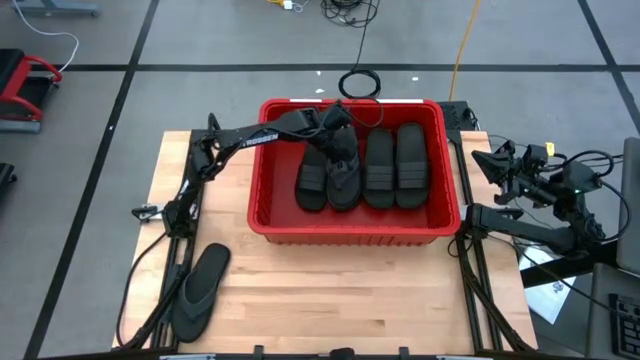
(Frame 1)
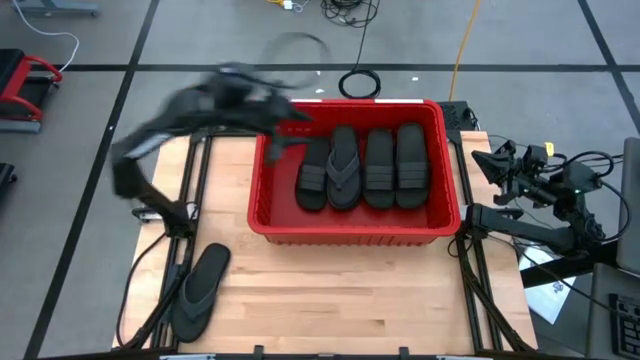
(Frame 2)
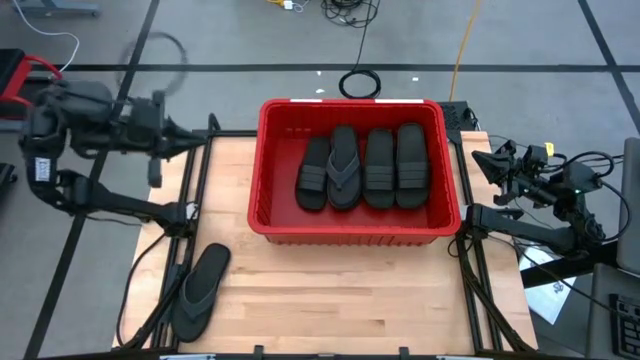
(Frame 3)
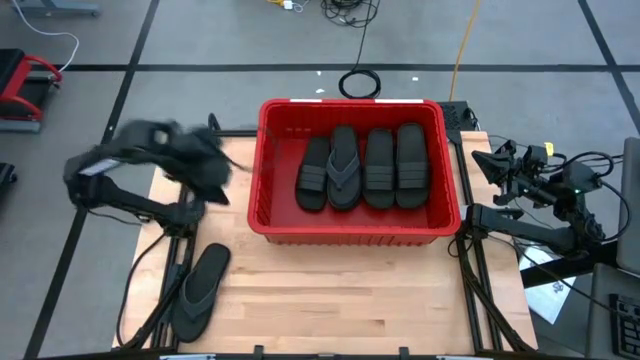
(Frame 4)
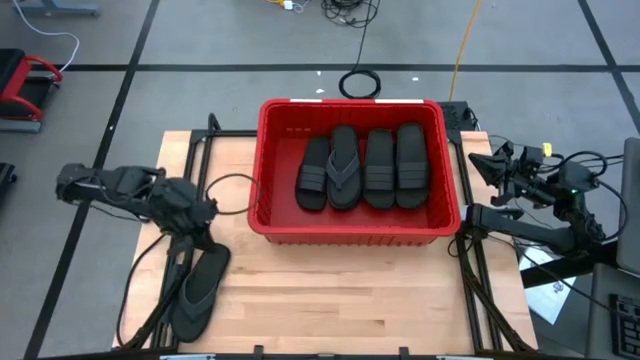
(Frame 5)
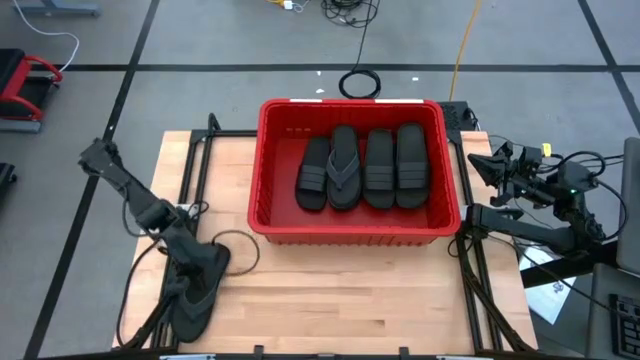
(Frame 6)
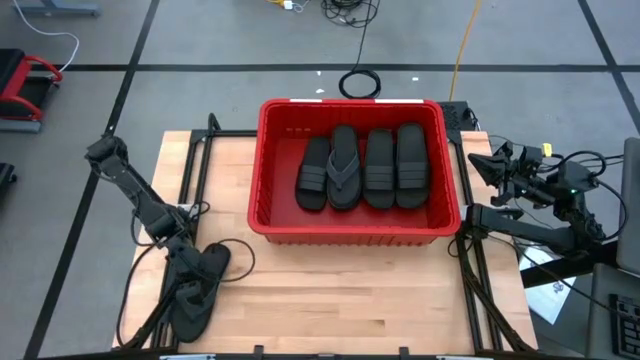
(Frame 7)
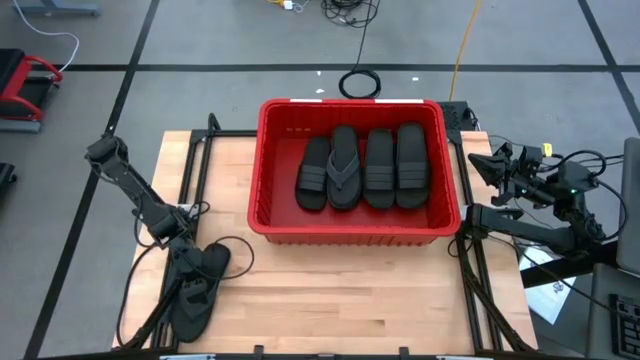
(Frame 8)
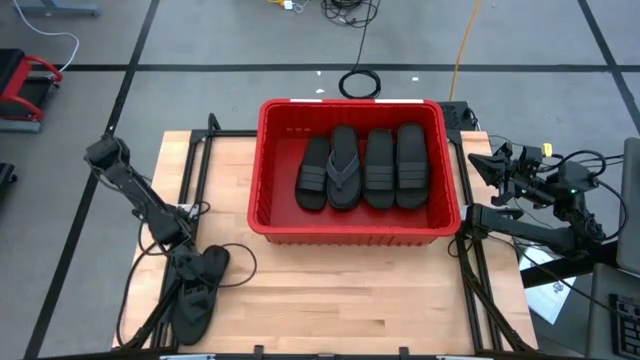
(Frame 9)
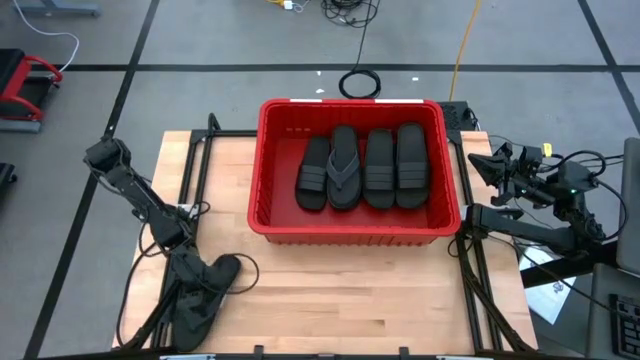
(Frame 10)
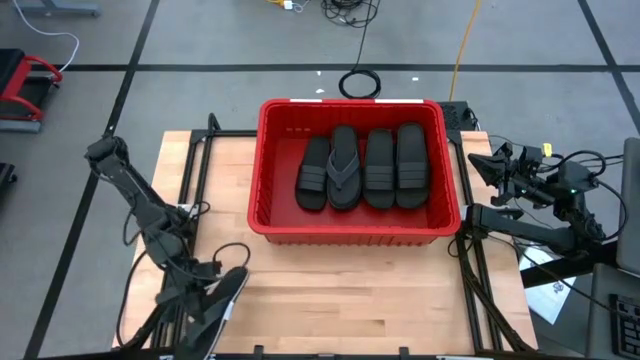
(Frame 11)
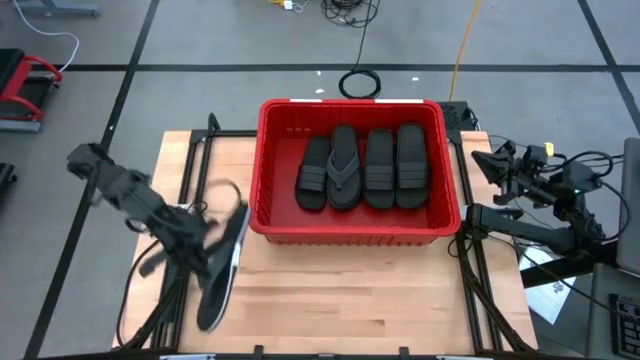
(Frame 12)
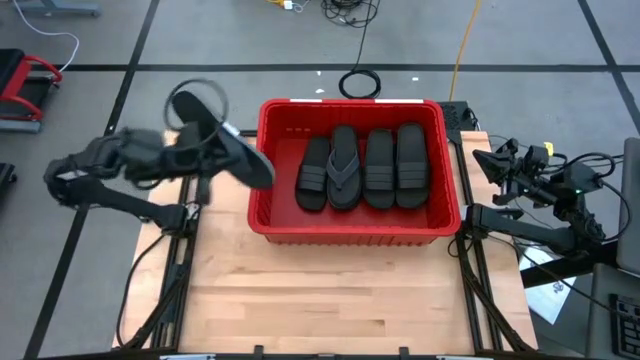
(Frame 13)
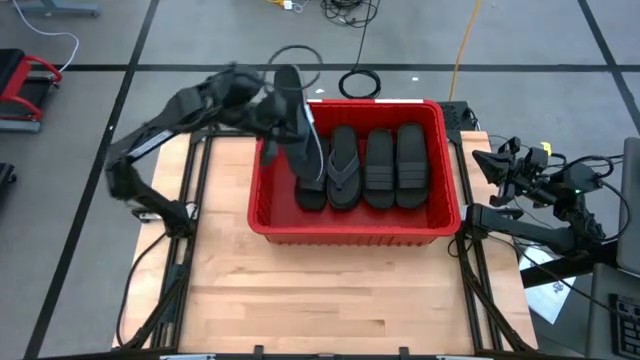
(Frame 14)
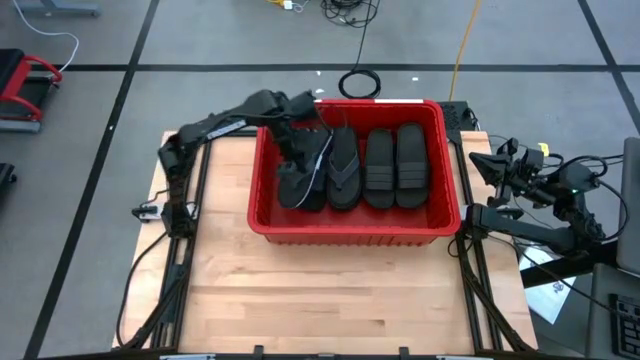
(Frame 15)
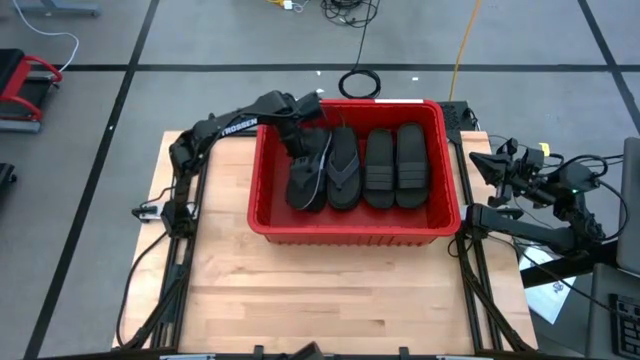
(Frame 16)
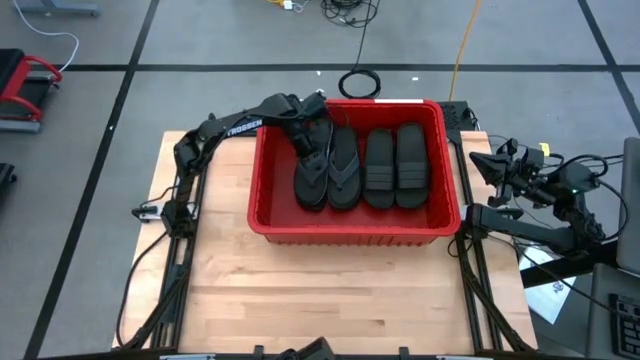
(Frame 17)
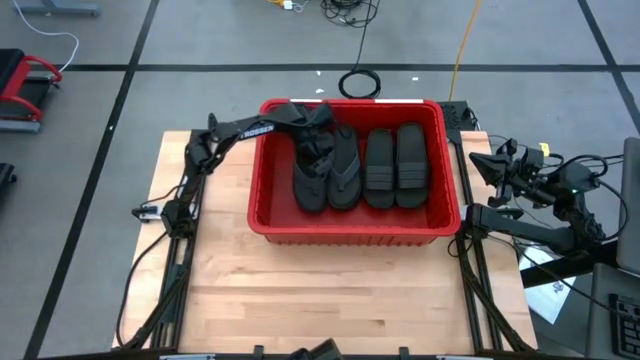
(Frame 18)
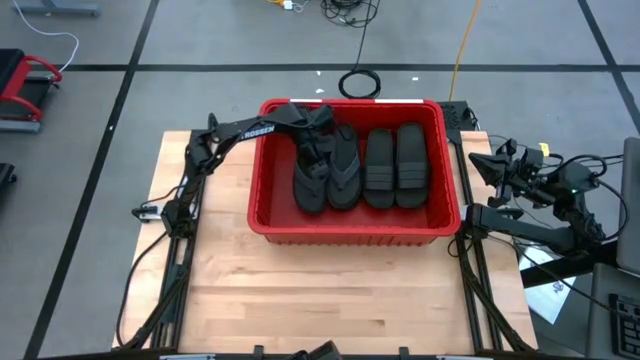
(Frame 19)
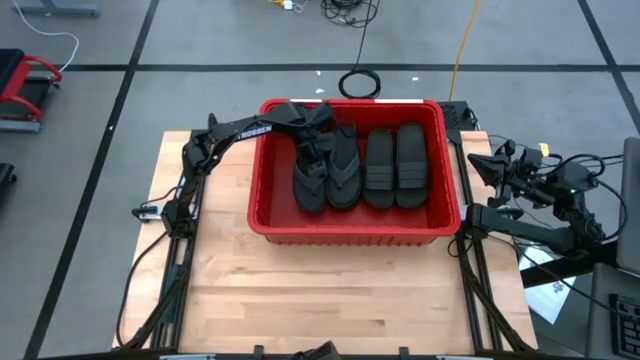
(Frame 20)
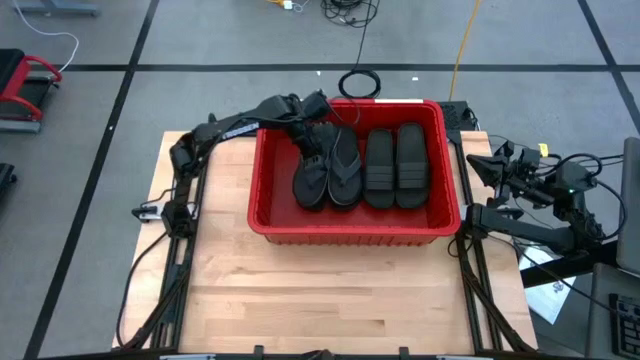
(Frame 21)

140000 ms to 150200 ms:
Task: Pick and place slides into bin
Put the black slipper into the red bin

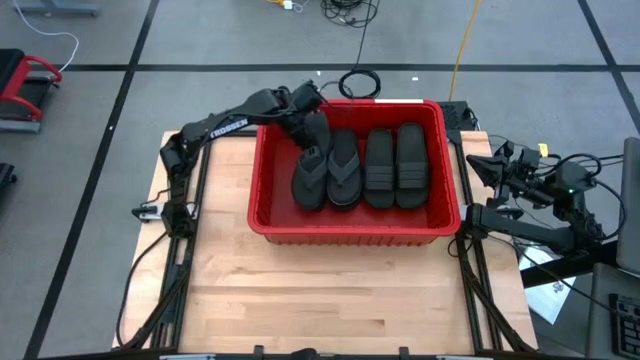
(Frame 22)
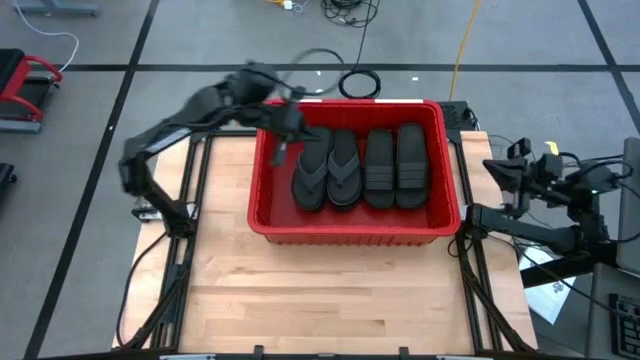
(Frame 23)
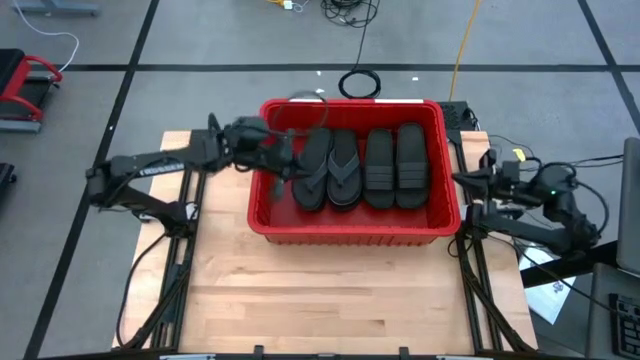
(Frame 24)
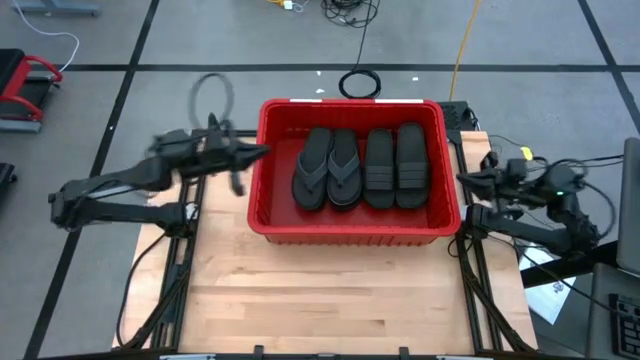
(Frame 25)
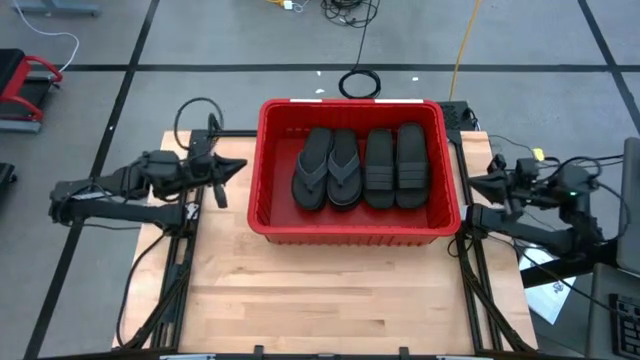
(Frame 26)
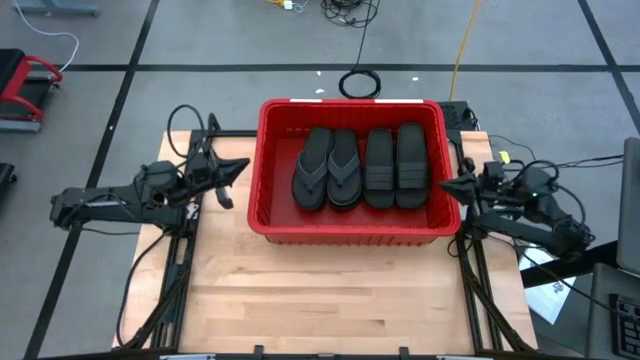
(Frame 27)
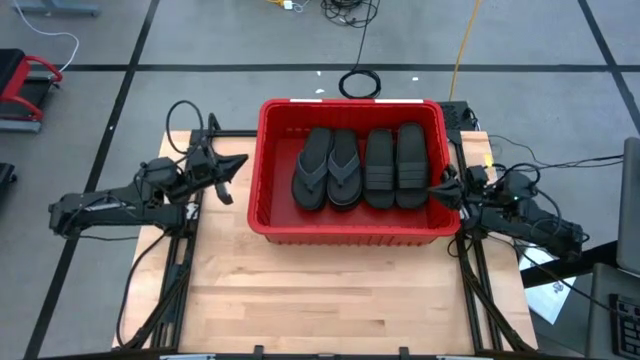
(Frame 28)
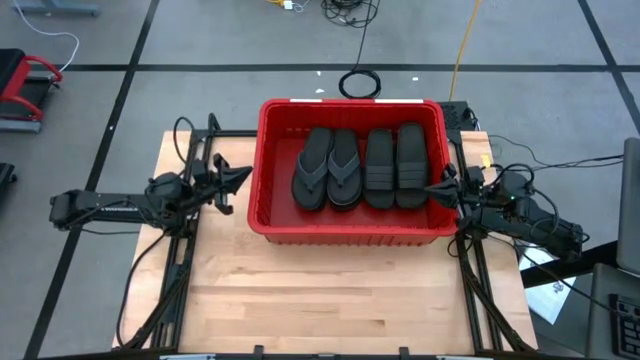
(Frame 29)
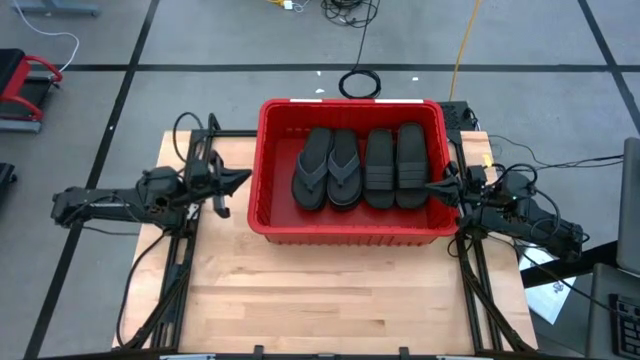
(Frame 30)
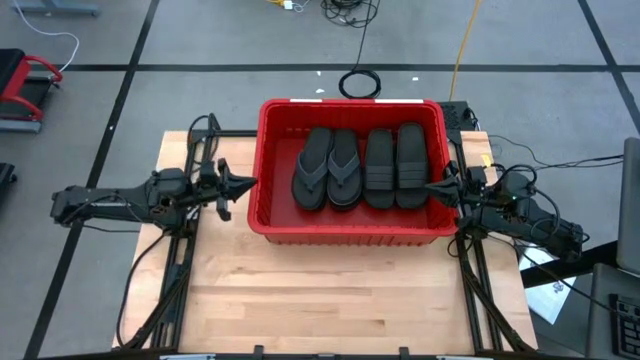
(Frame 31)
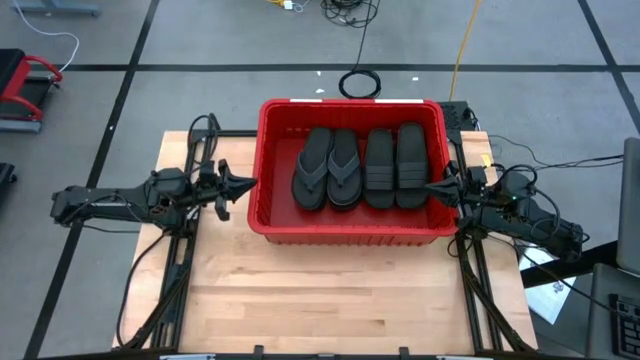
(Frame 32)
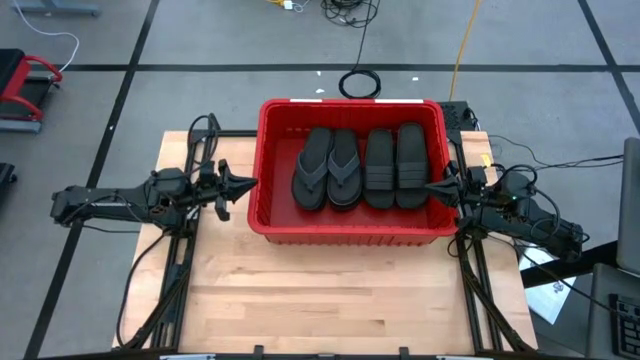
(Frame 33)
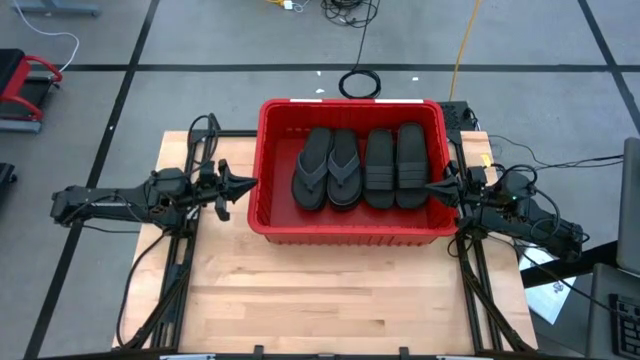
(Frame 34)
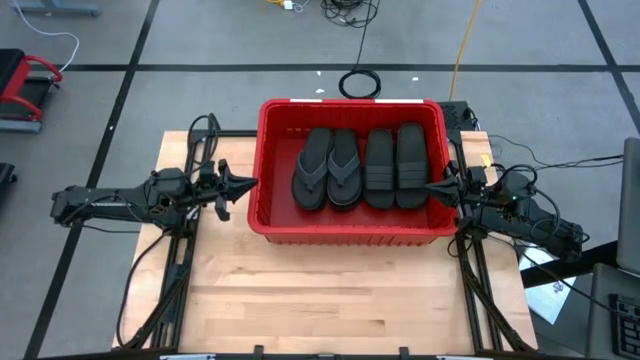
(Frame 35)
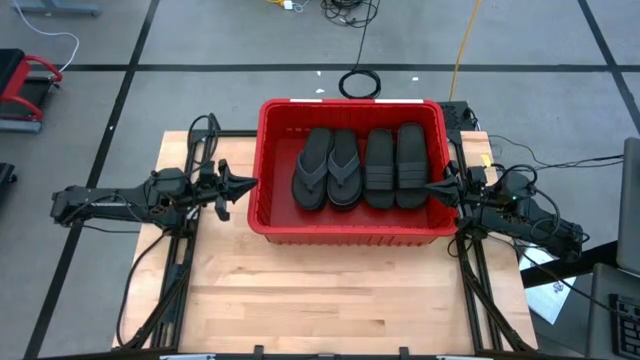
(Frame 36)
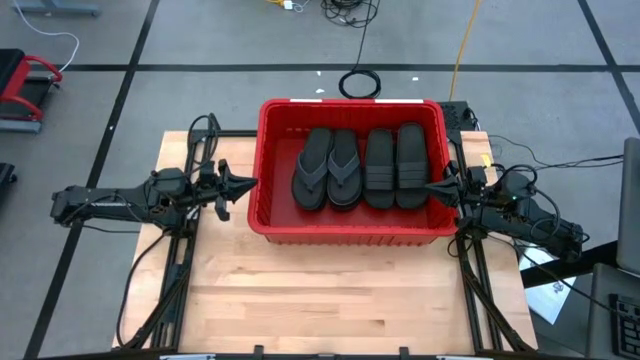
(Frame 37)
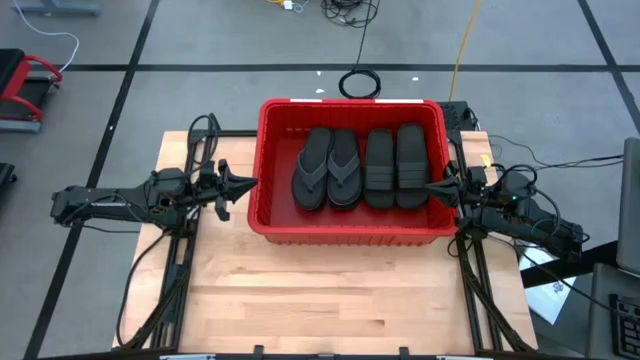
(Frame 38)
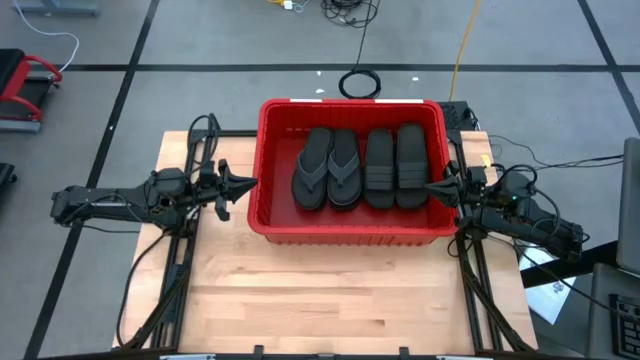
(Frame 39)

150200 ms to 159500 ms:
Return to Home Position

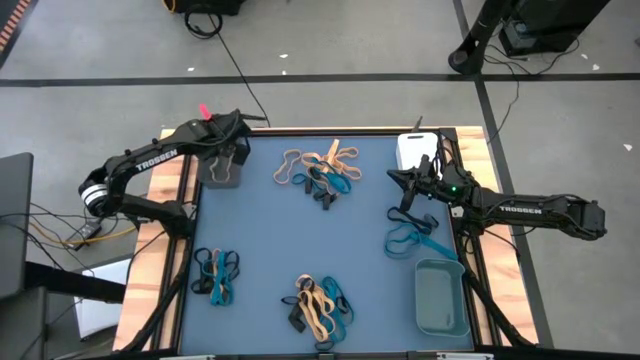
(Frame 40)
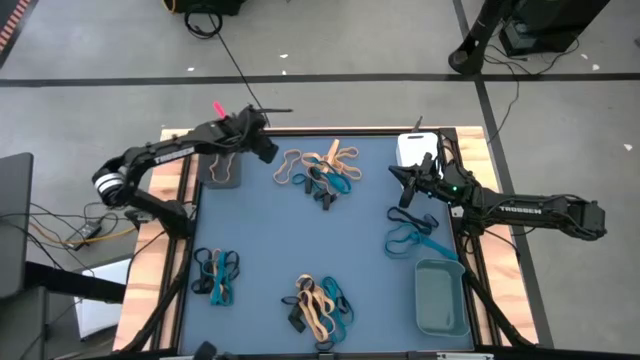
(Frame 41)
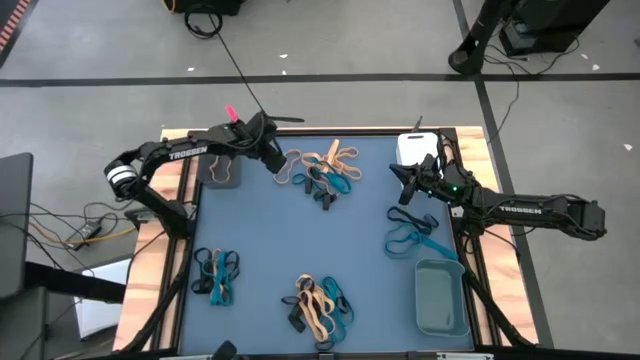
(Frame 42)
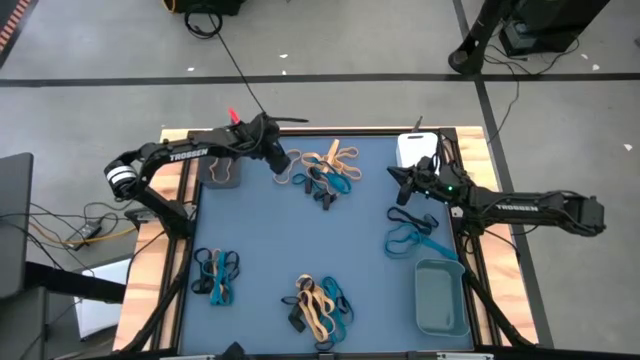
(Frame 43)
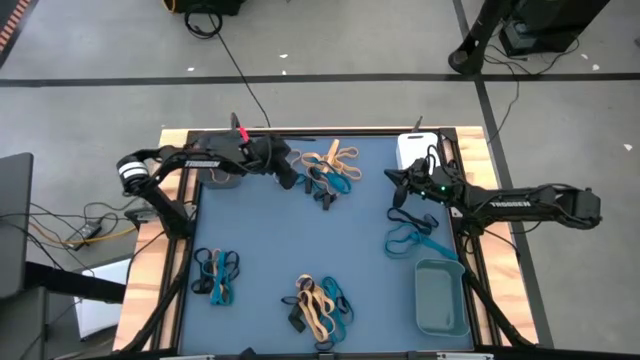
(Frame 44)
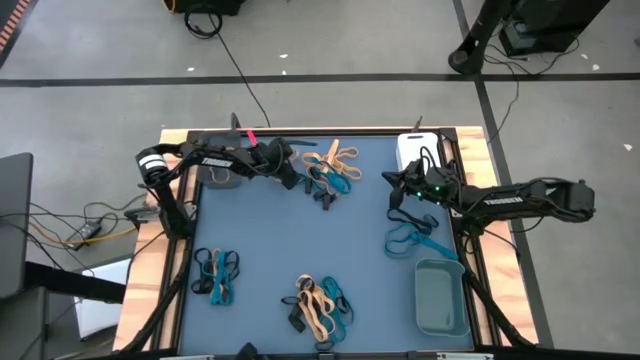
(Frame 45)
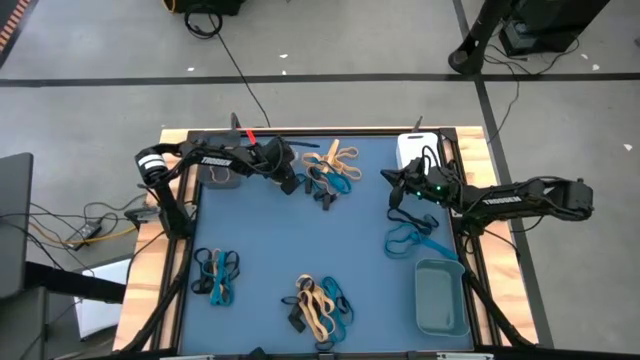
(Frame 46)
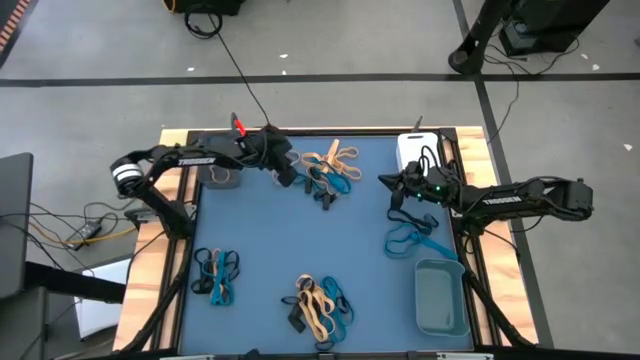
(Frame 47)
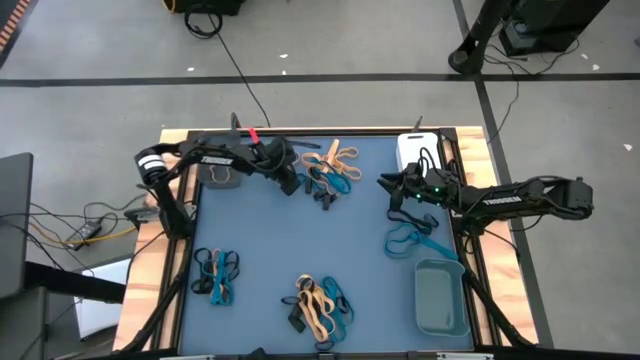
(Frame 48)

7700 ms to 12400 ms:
Task: Sort rubber bands into baskets
Put the yellow rubber band into the black bin
